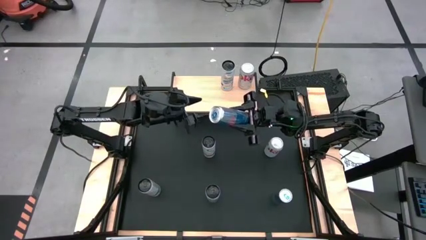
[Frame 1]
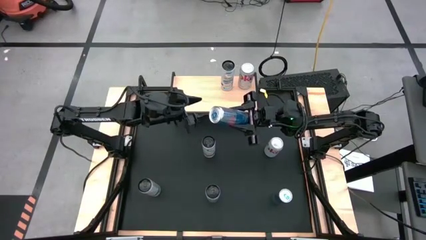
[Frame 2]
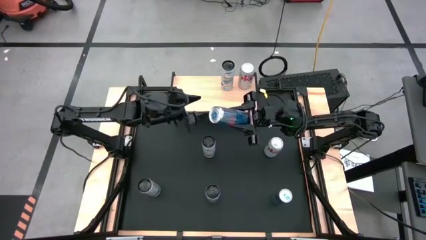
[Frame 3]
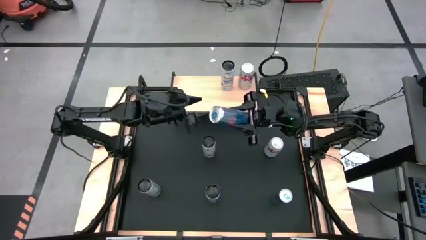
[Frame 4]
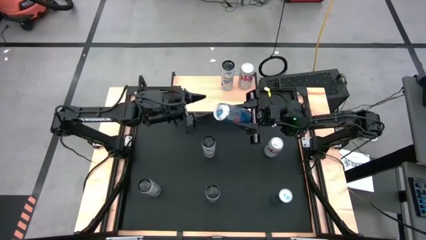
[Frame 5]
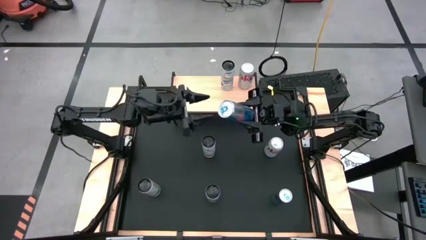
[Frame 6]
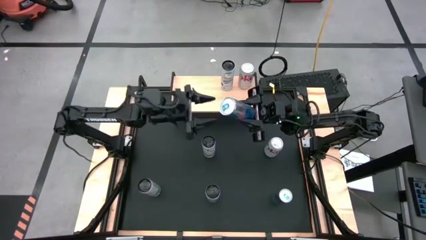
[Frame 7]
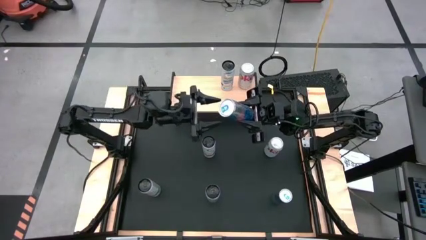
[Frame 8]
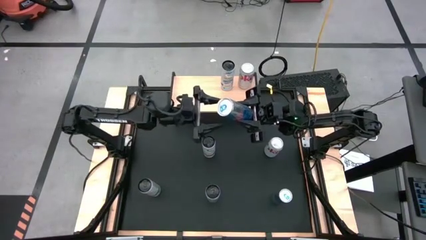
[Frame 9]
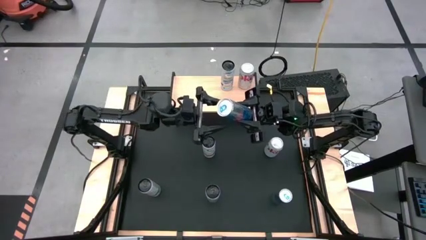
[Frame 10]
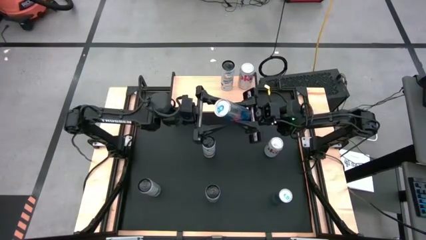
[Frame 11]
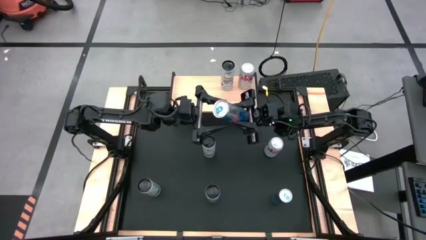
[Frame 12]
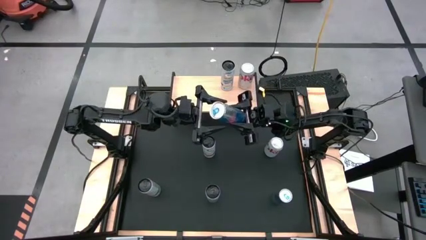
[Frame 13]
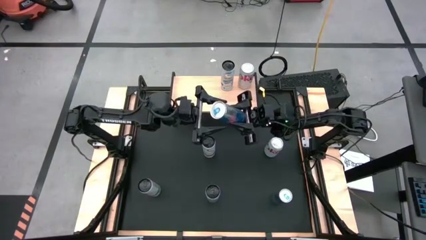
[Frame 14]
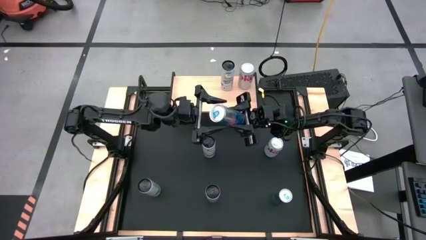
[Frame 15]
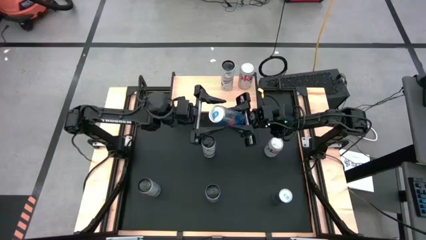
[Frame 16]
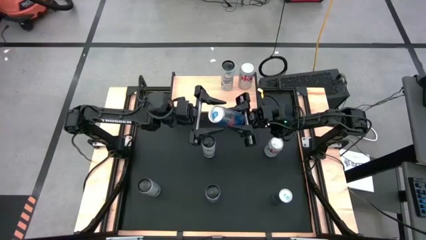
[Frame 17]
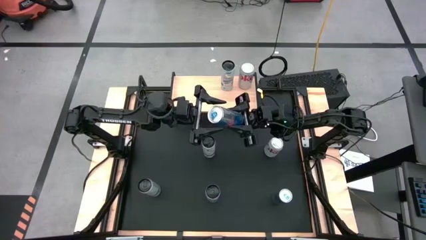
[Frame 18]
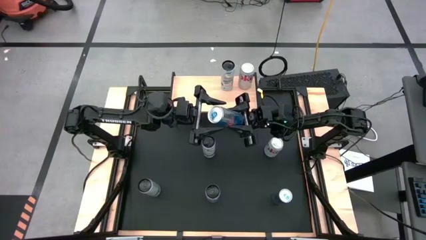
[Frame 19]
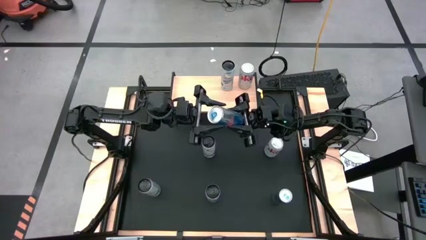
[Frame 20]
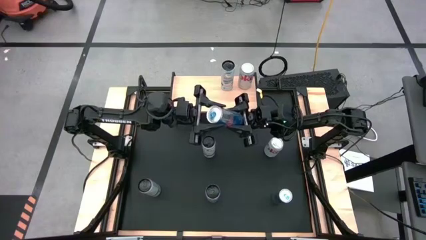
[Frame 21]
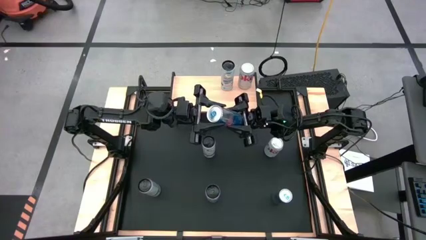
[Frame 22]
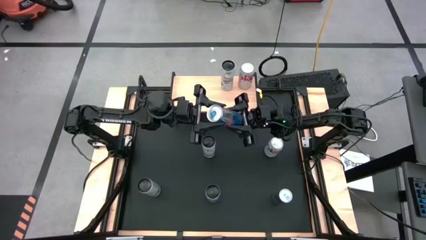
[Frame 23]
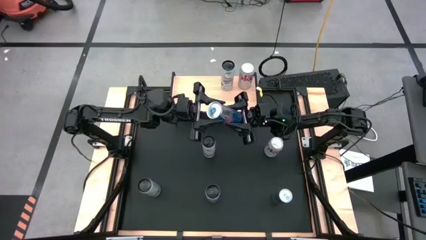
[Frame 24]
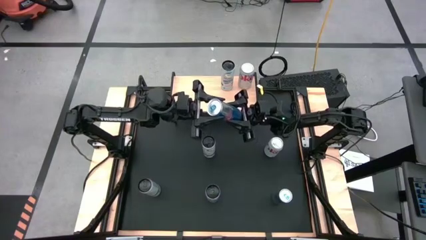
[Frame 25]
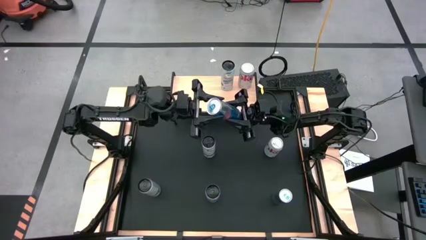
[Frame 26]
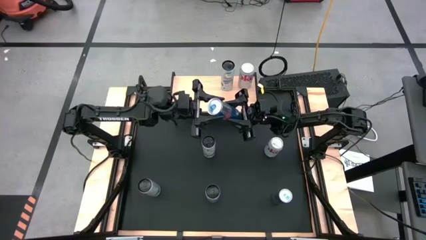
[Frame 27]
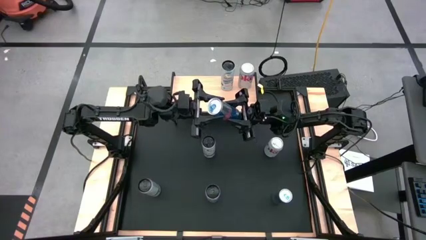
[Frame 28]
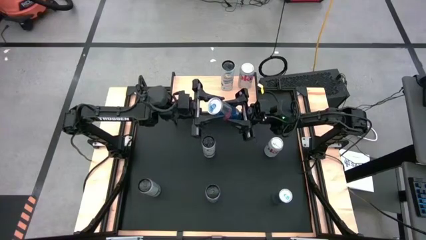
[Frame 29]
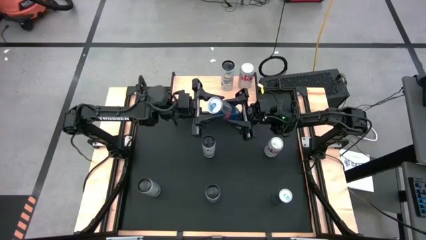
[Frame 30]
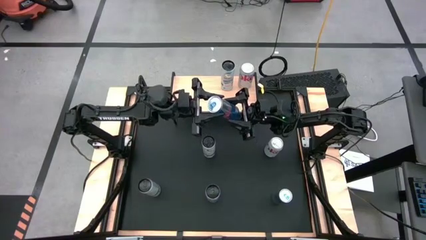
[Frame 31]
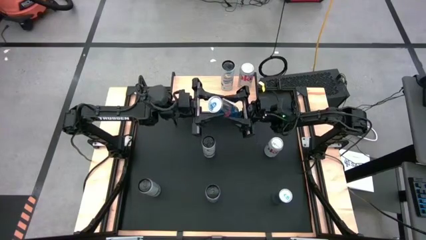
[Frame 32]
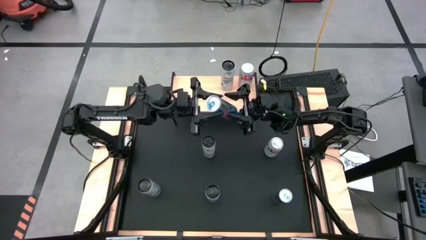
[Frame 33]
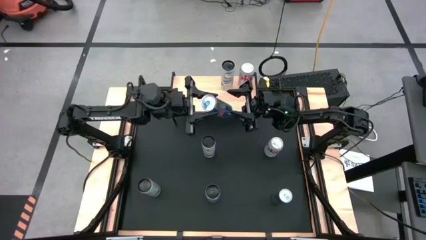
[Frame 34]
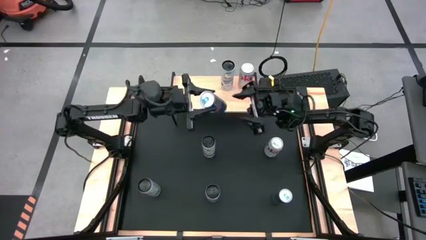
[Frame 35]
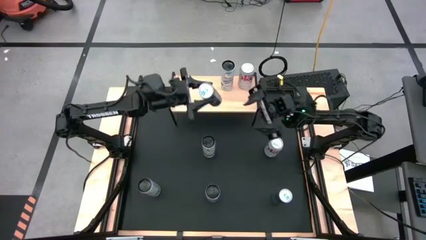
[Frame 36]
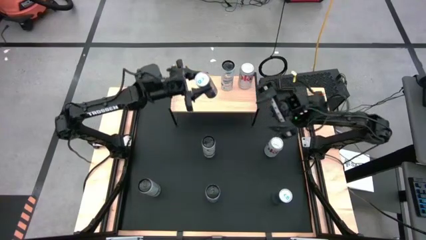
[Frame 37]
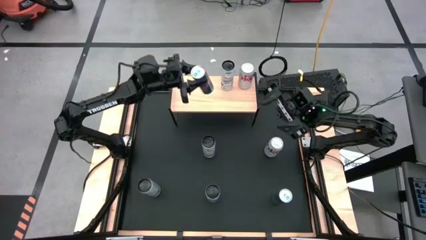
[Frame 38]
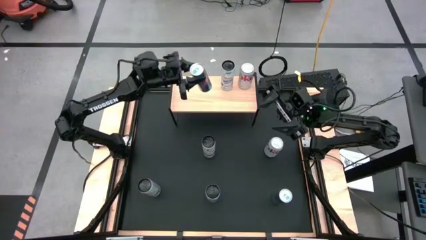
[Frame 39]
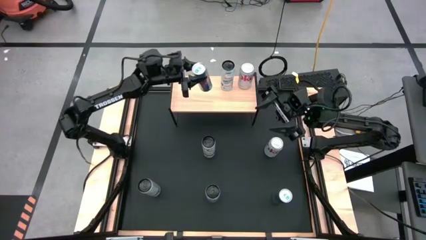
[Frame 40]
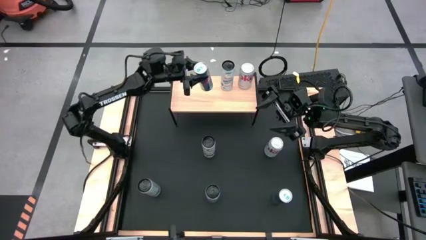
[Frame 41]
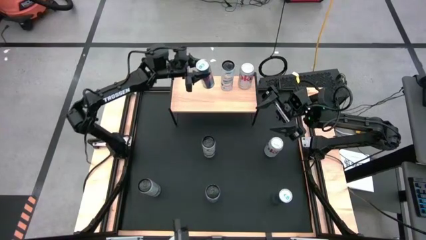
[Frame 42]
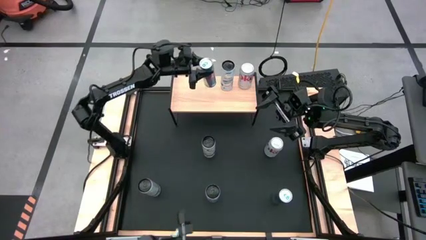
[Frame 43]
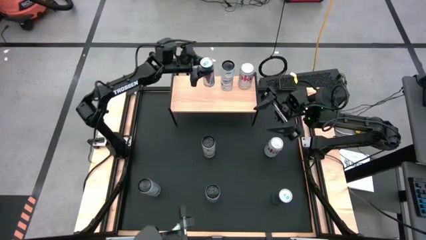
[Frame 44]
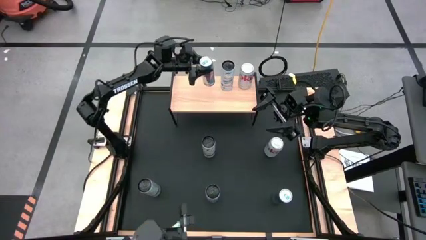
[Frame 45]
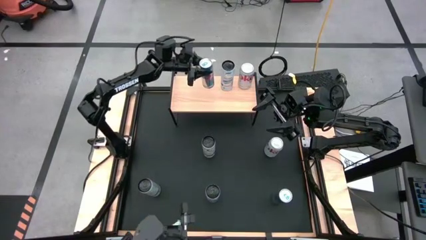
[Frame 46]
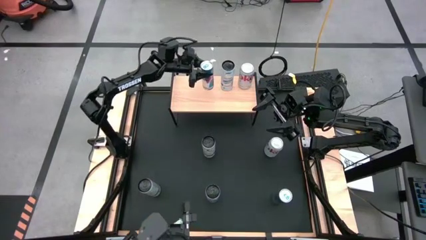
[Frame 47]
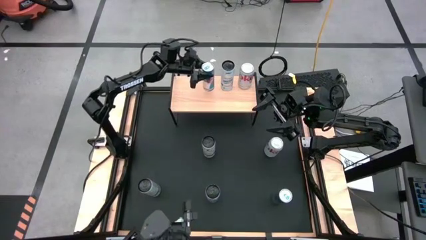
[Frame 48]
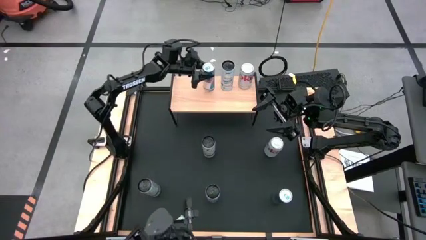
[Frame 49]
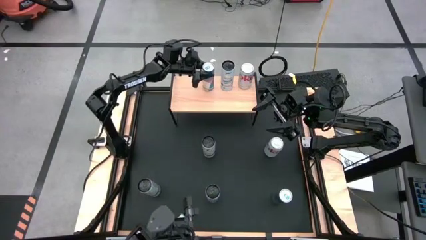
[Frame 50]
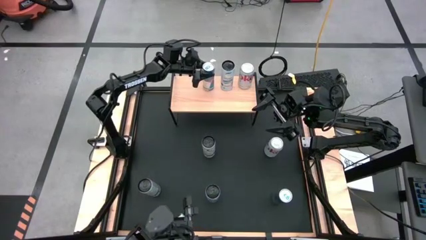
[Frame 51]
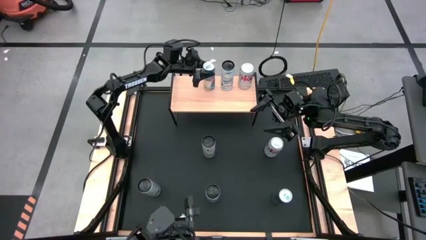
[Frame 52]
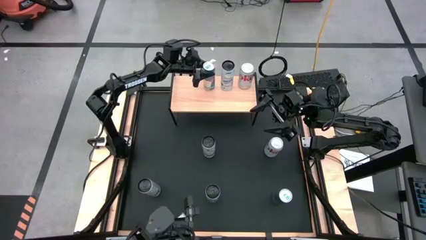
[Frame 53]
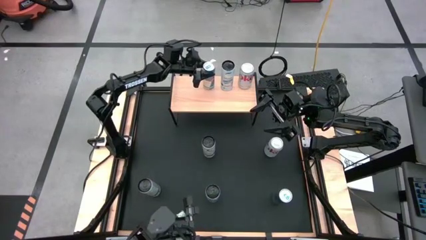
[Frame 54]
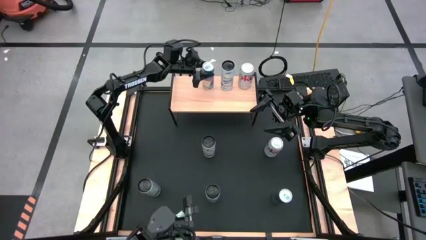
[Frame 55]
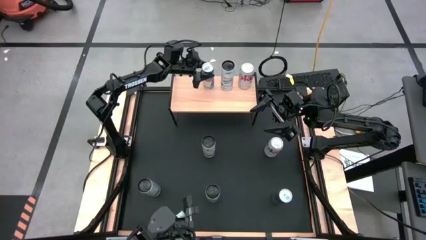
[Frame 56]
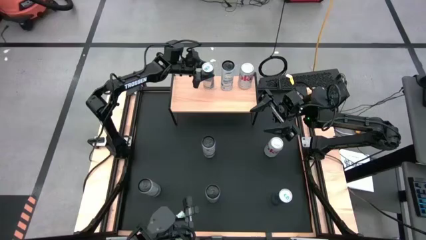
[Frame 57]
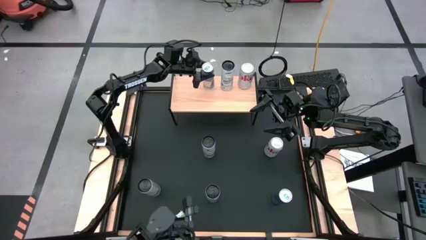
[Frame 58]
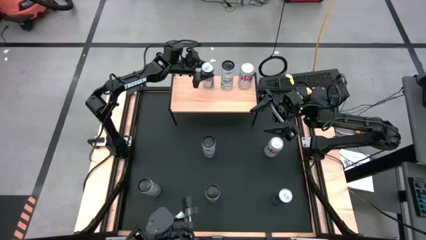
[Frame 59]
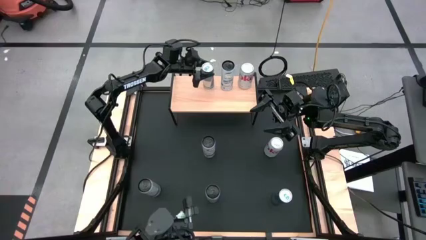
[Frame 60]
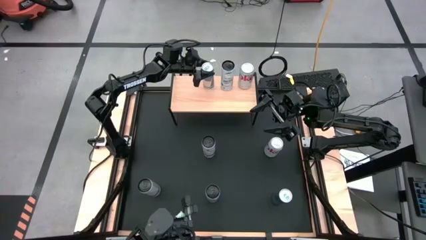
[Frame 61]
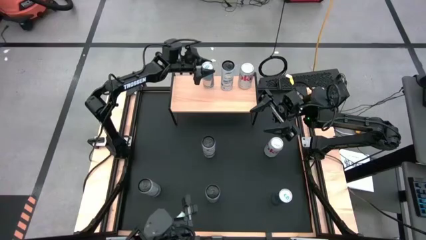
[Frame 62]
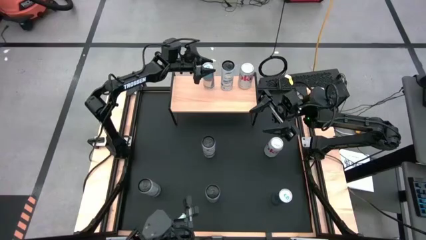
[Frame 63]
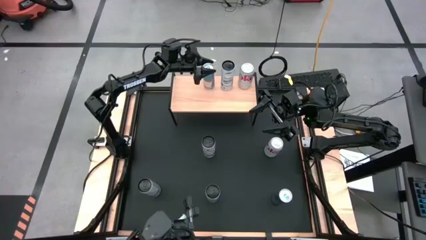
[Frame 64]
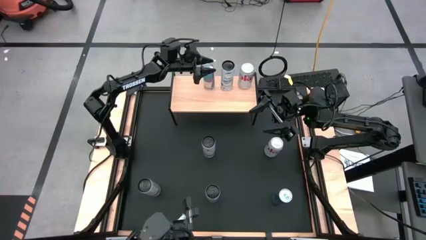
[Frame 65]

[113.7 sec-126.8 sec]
Task: Place canned beverage on shelf
Put the top left blue soda can on the shelf

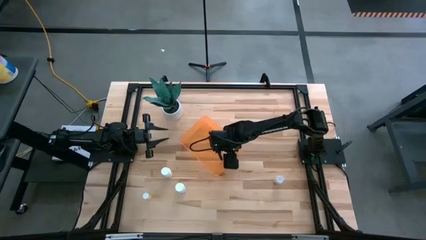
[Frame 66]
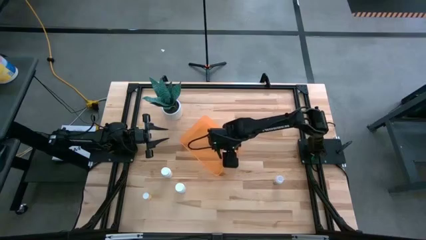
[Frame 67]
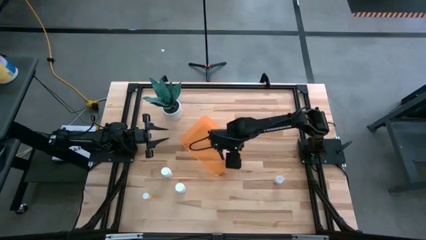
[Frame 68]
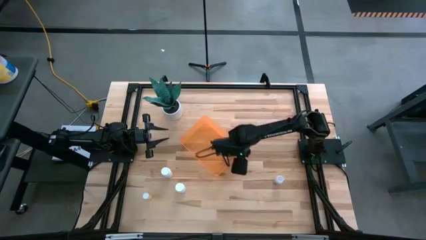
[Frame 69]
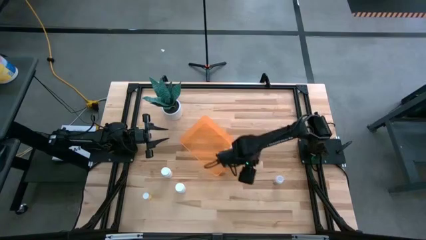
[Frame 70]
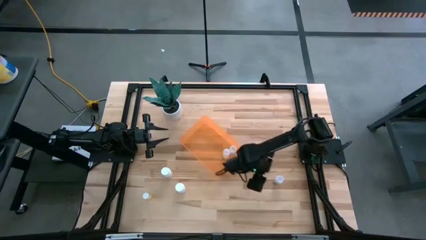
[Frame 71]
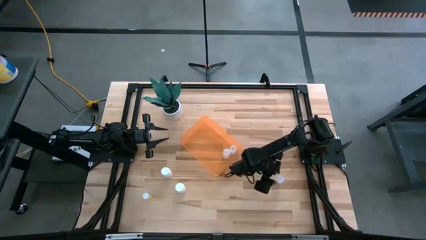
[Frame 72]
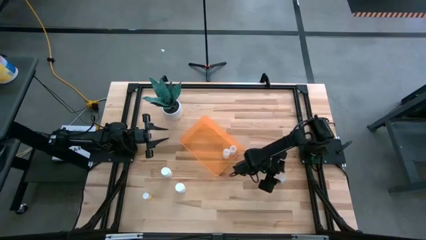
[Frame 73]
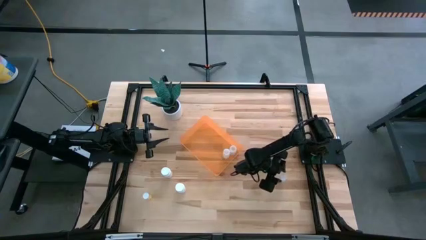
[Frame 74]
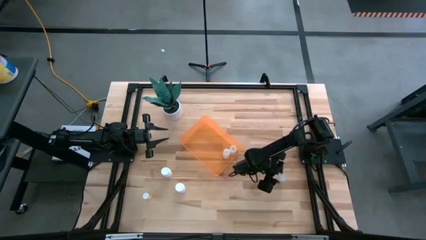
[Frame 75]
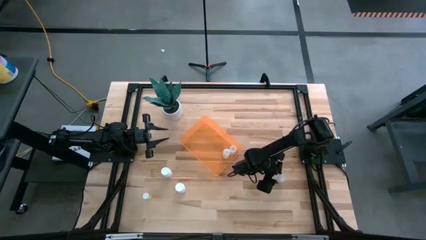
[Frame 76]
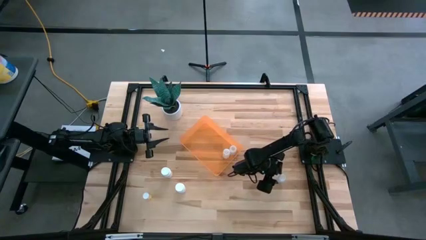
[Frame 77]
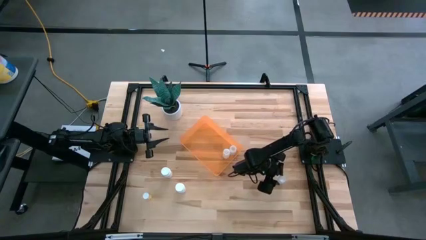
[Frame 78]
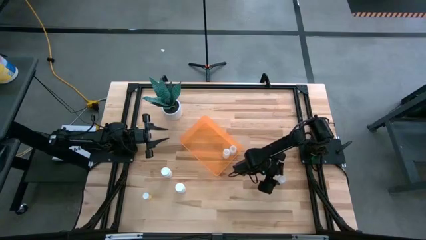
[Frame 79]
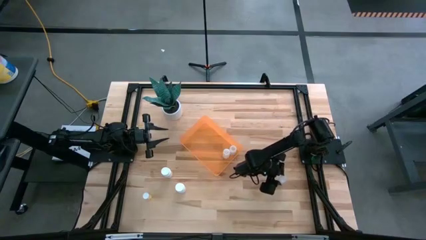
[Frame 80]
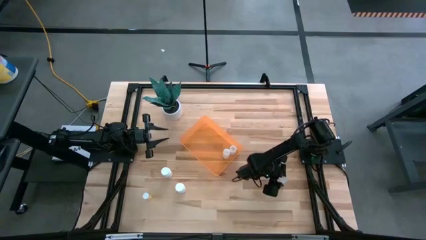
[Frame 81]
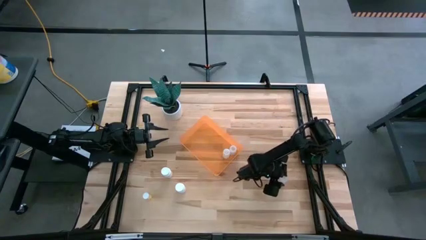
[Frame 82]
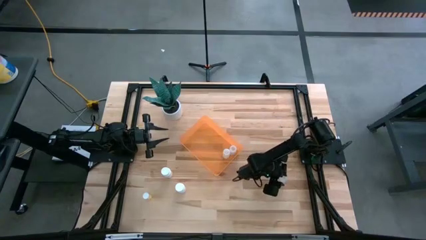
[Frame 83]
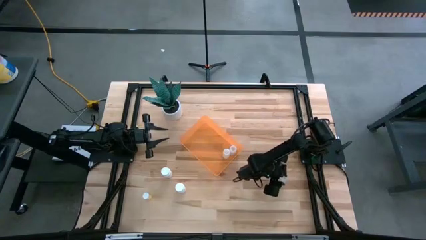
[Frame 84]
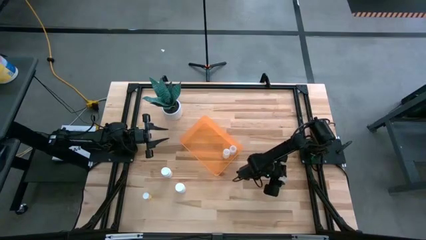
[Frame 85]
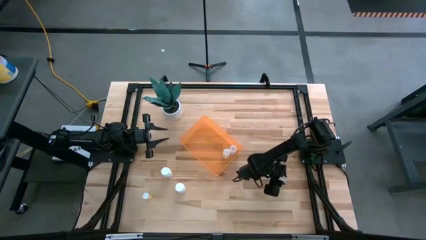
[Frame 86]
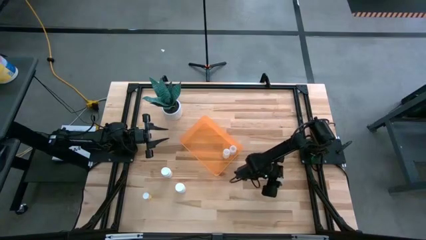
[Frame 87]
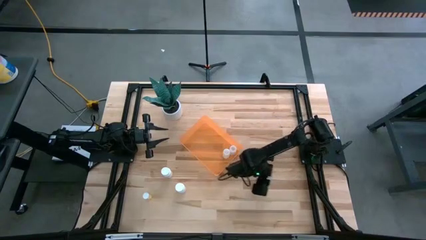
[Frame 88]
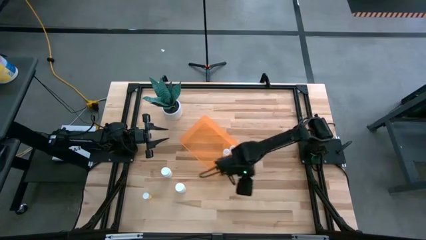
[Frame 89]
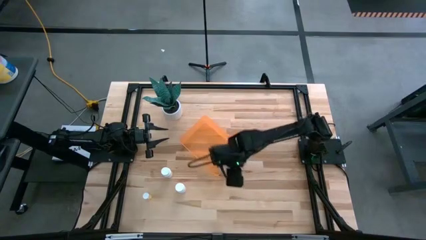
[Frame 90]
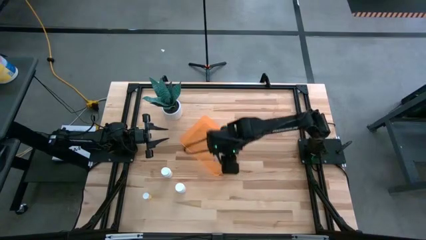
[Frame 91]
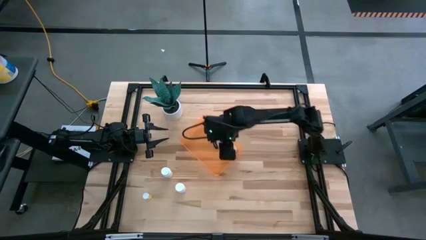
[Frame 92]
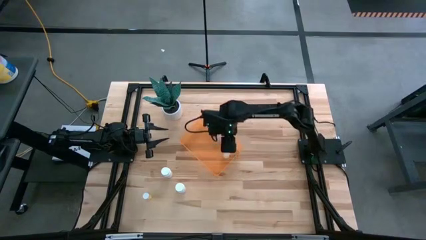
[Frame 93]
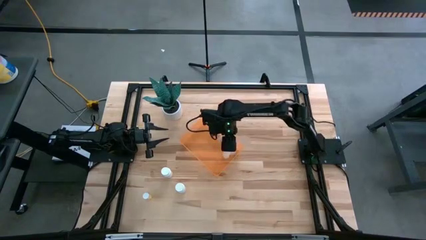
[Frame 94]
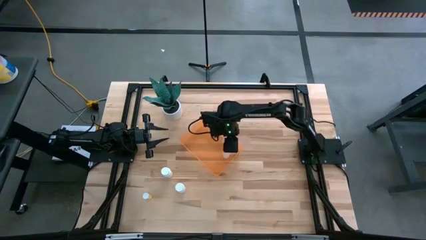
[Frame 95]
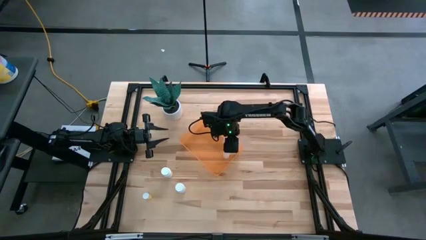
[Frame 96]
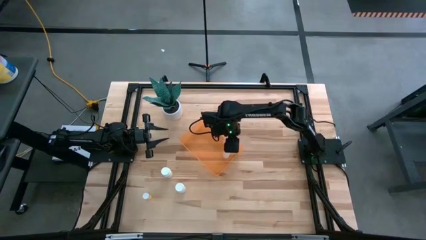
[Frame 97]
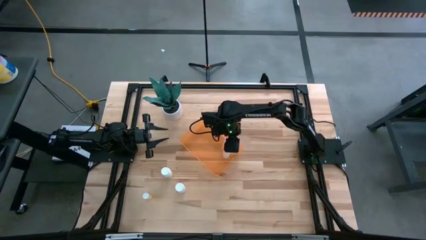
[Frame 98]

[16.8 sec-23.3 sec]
Task: Pick and place pill bottles into a basket
Put the transparent pill bottle into the transparent orange bin
